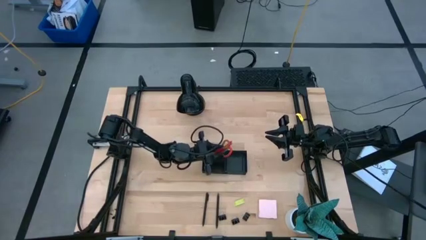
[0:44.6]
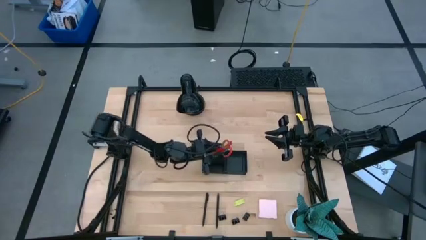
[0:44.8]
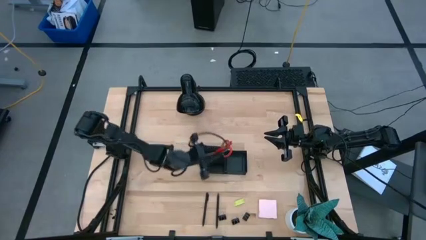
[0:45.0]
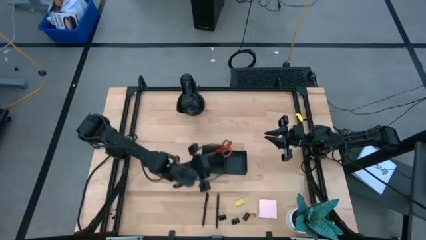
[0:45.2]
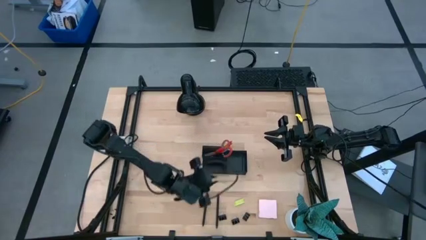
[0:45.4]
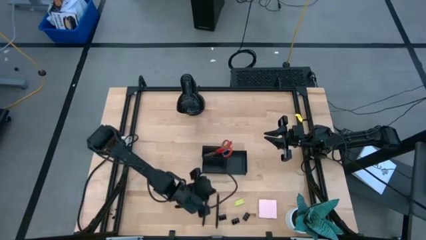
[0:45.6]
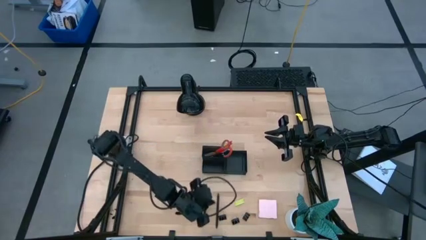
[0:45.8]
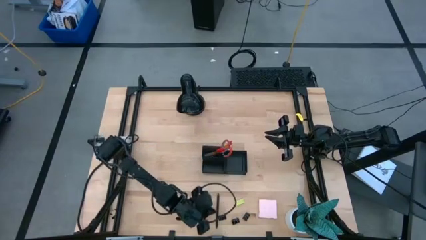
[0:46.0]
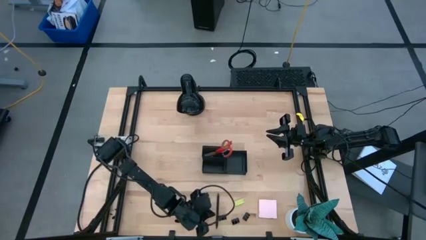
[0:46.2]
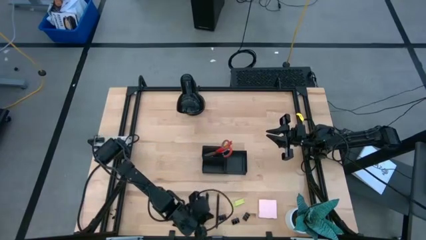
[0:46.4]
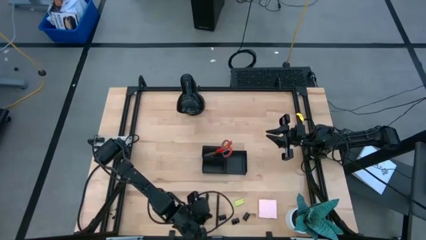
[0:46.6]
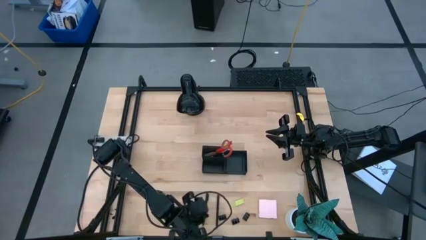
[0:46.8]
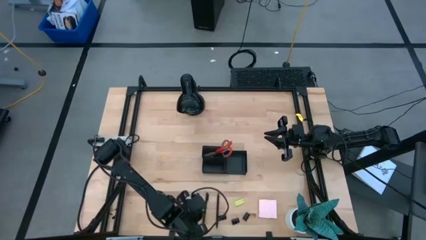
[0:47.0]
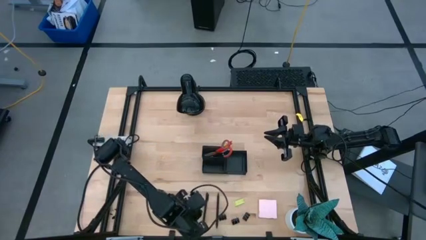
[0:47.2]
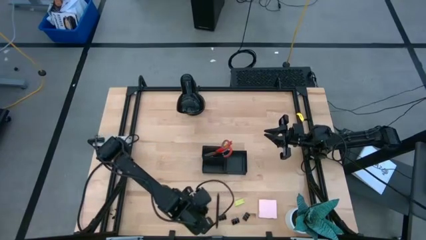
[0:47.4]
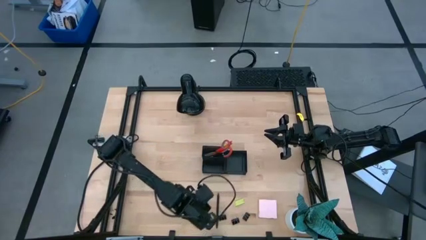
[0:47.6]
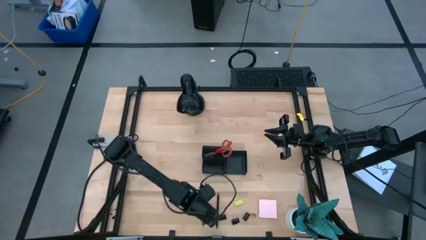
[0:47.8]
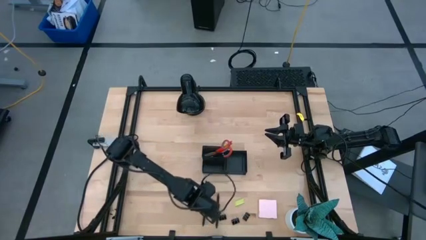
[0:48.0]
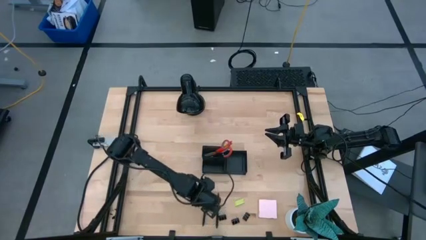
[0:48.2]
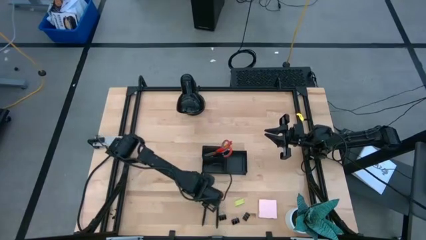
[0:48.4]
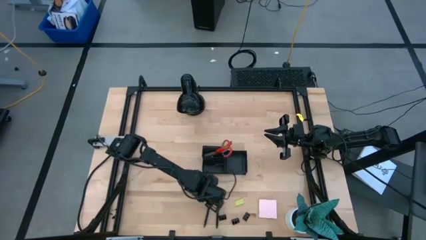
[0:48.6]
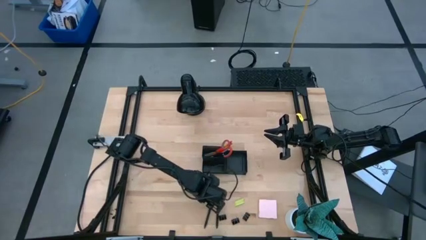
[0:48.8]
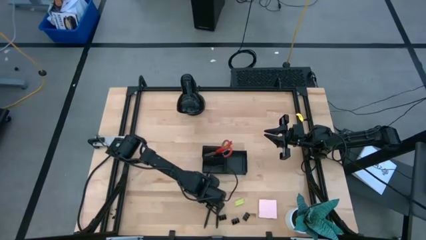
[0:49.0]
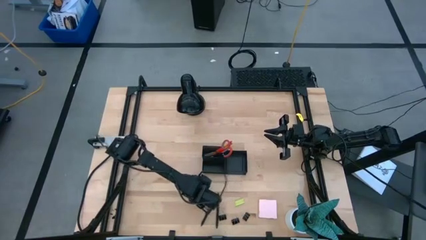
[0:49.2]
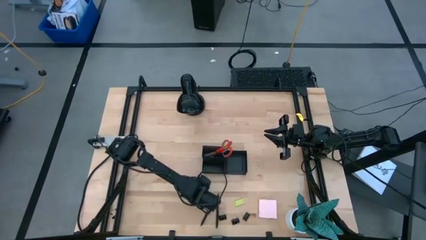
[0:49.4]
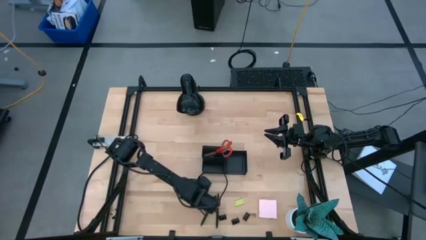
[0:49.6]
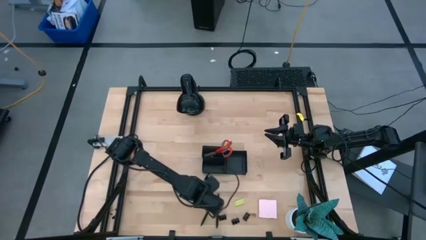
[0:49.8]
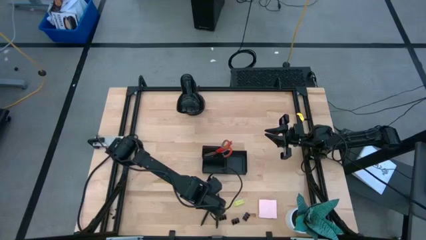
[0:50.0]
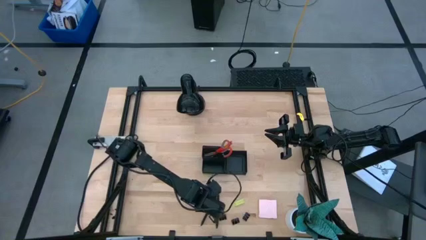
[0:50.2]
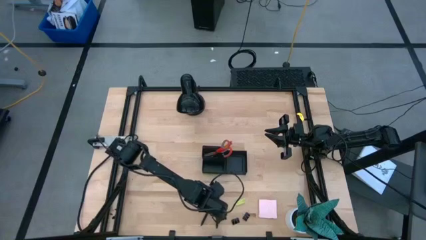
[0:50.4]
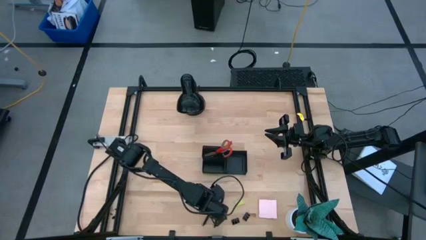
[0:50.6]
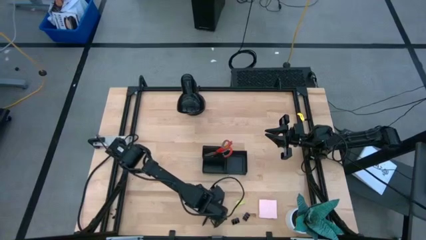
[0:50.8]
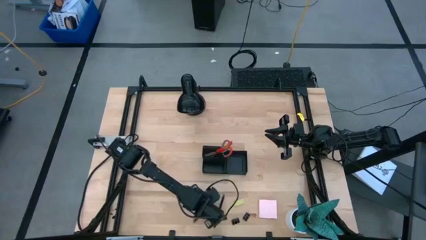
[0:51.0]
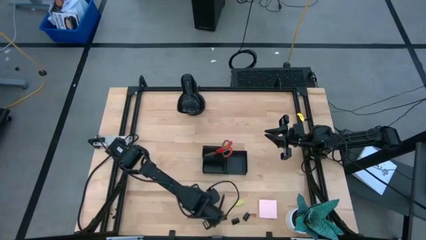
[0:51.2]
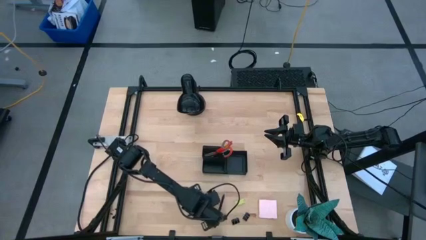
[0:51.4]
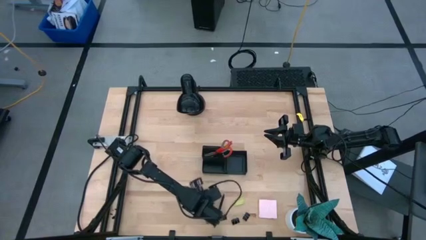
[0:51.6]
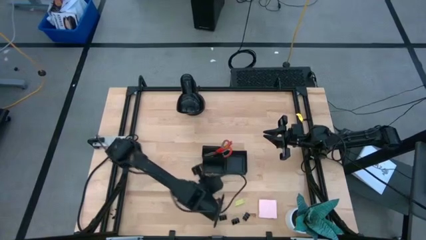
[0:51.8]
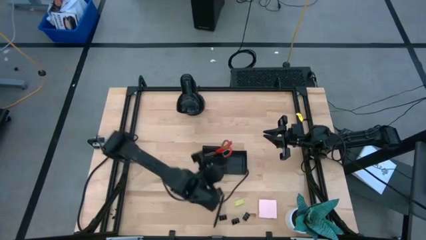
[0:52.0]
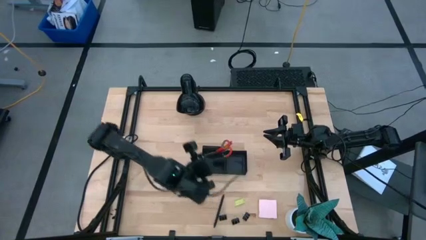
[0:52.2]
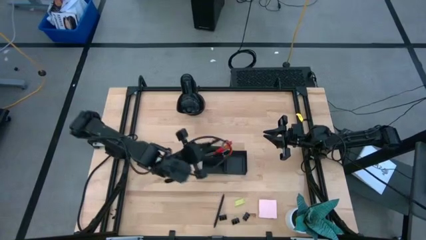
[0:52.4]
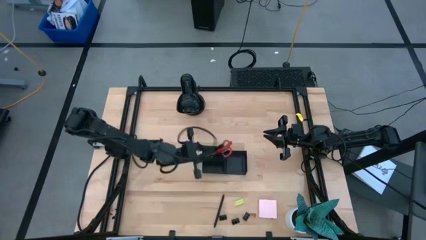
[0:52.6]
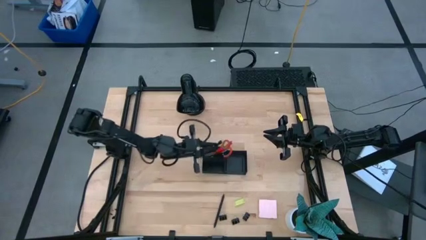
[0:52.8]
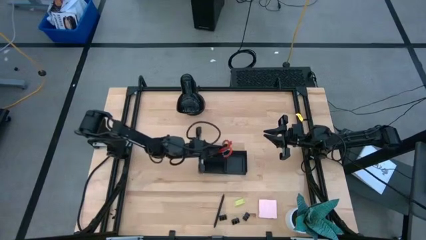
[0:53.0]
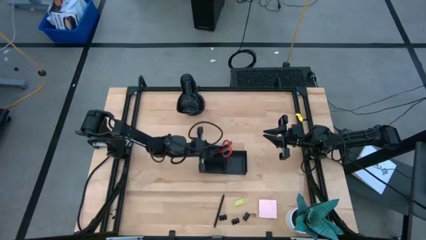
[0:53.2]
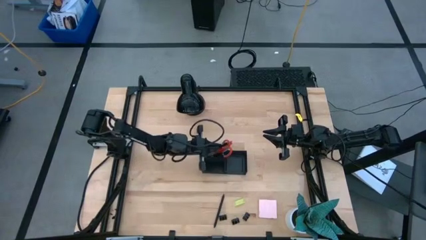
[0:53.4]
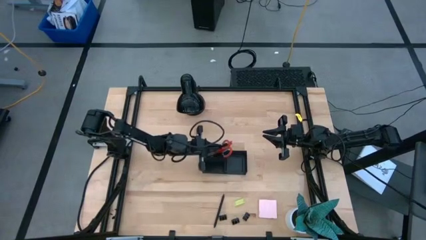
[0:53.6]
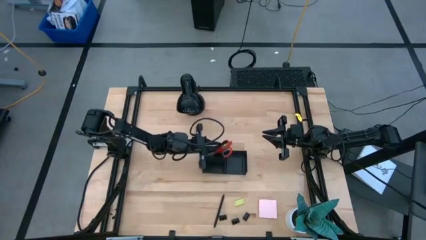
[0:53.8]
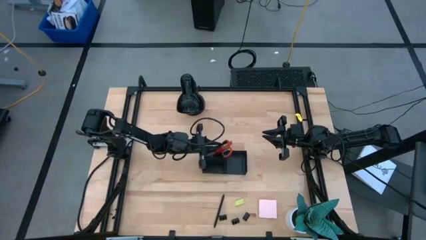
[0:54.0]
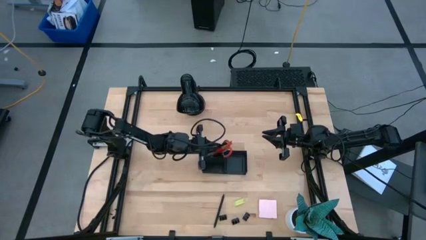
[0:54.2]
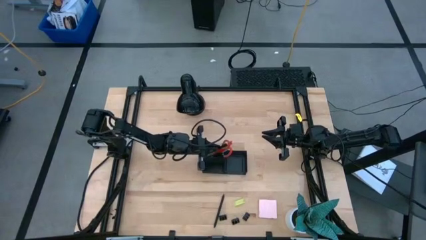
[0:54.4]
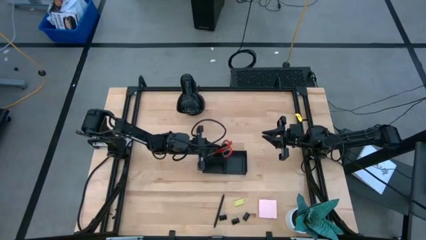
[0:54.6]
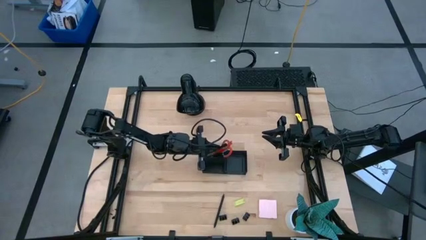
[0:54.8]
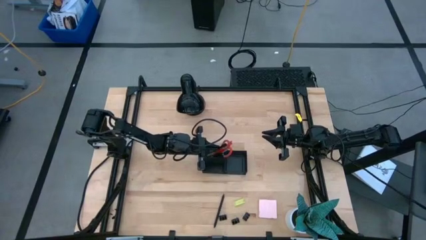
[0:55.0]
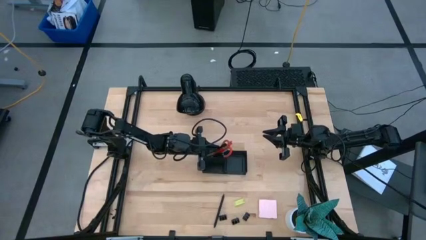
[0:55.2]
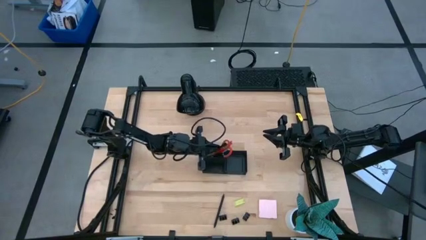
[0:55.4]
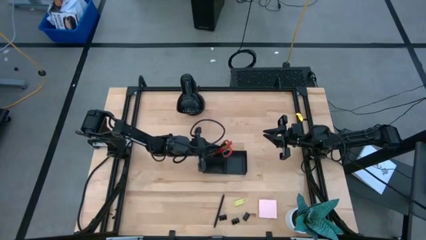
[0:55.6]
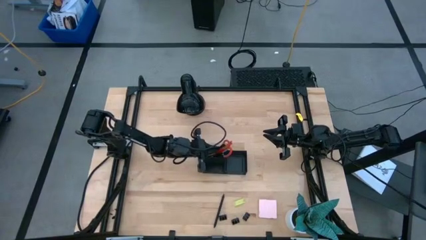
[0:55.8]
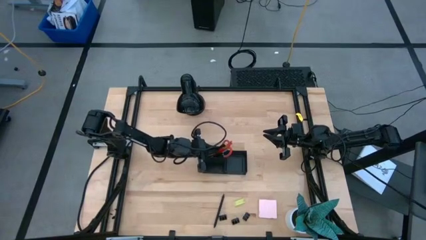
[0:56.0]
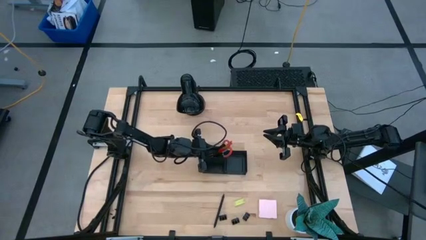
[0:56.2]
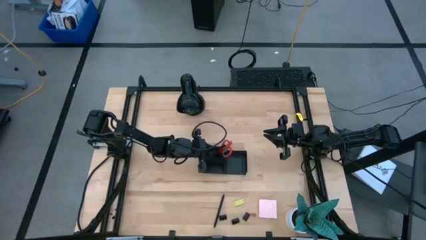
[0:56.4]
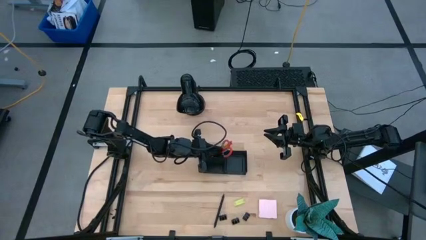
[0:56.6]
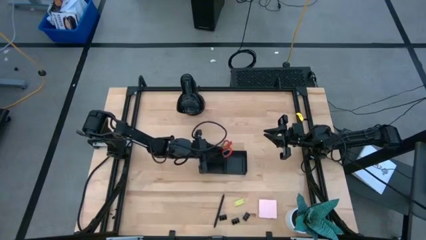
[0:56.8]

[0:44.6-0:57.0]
Task: Pick and place office supplies into organizer
Put the left pen into the desk organizer

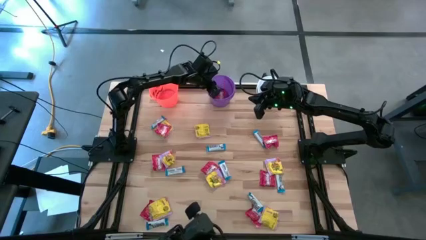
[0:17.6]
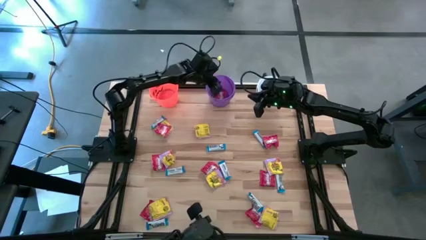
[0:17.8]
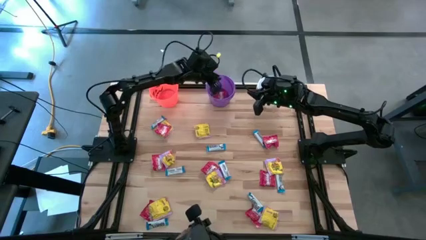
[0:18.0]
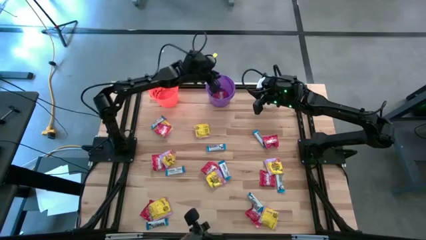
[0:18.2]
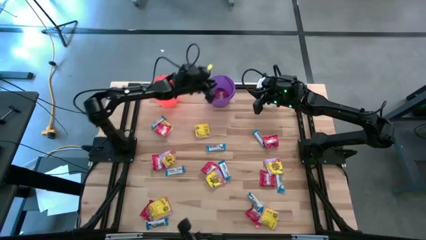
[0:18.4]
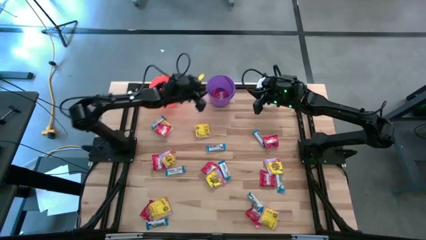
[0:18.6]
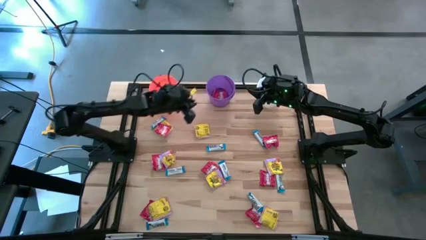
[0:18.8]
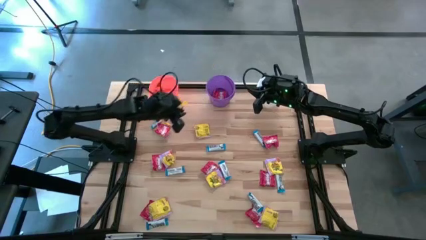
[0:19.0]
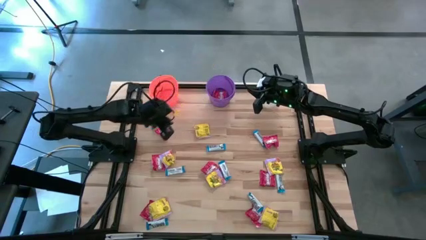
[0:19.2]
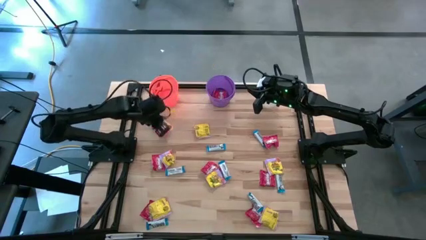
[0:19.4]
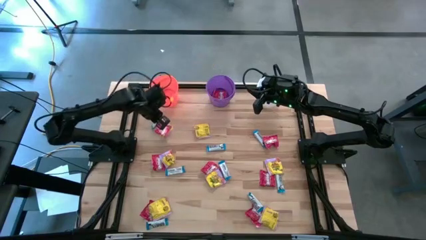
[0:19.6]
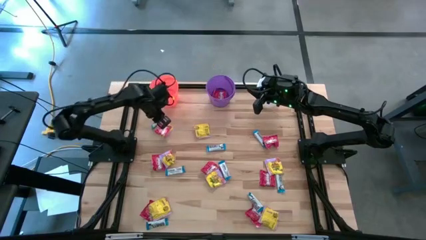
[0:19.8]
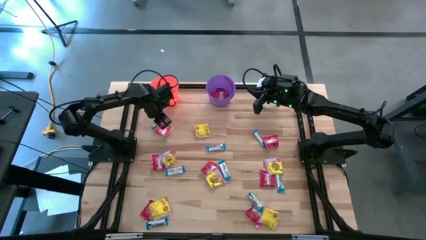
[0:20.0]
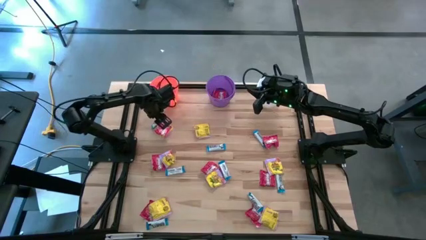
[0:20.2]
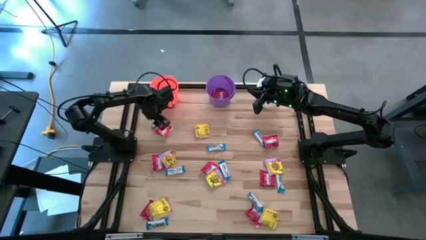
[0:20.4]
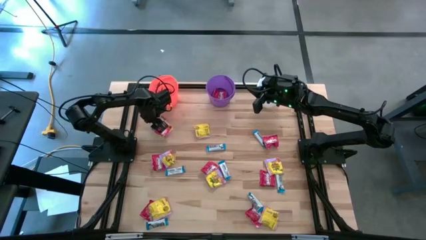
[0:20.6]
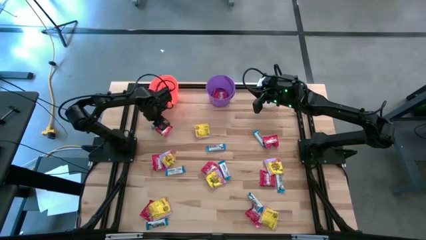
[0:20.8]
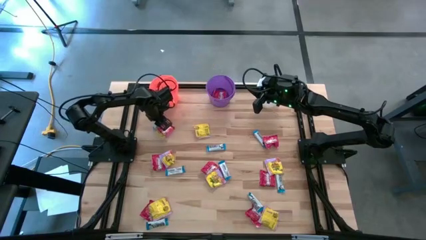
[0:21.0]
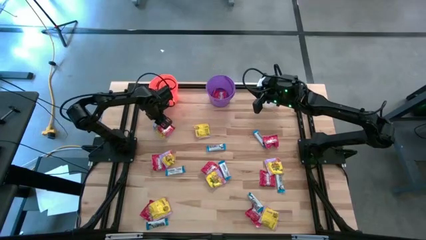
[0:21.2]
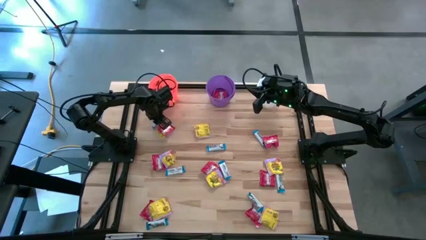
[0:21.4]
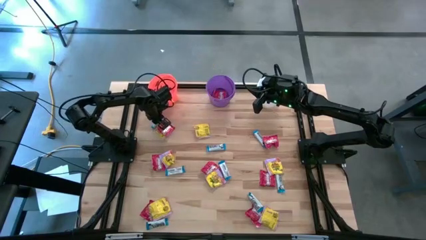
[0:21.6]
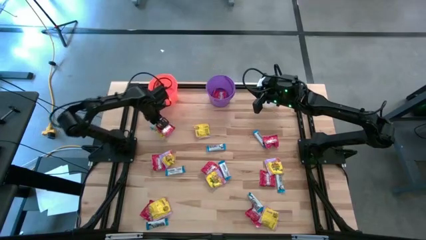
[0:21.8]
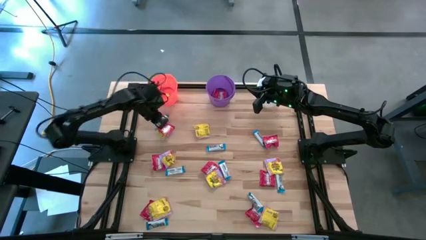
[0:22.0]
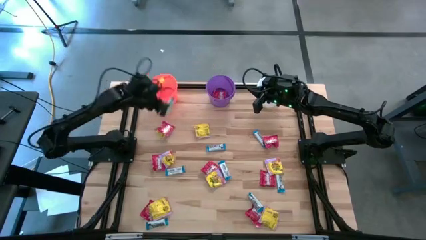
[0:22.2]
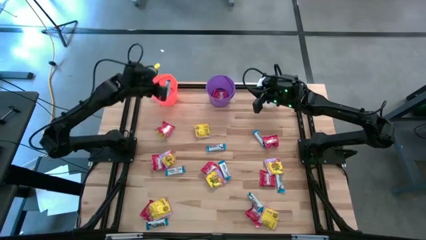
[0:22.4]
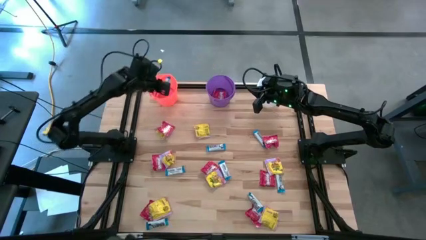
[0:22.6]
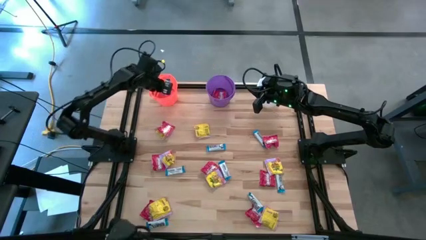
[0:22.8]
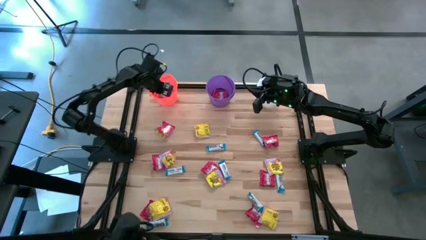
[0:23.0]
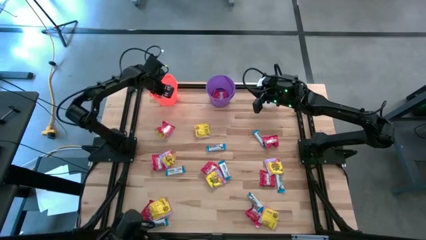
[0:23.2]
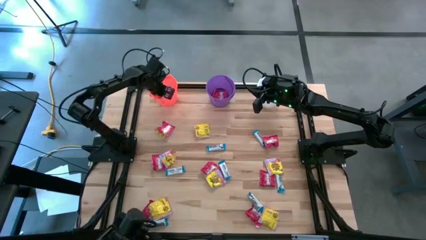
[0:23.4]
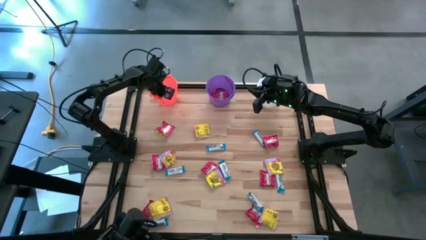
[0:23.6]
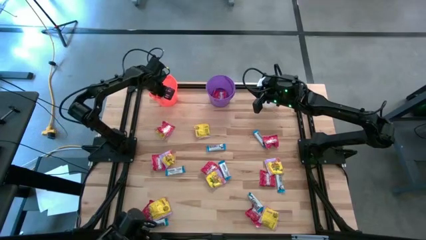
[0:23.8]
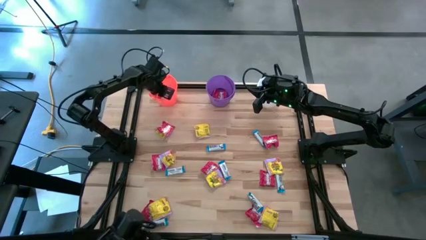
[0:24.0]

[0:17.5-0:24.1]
Task: Sort candy
Put the white chocolate bar into the orange bucket
